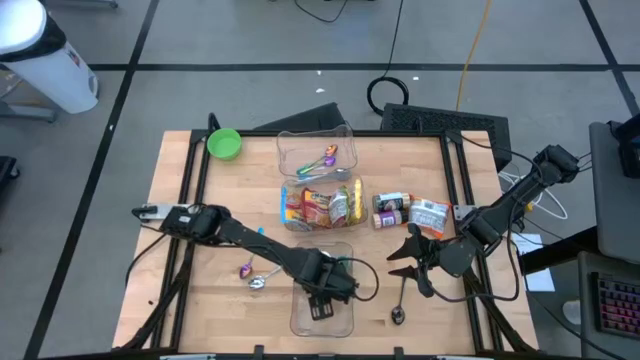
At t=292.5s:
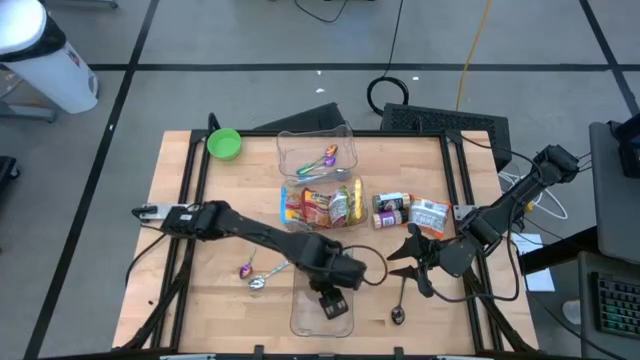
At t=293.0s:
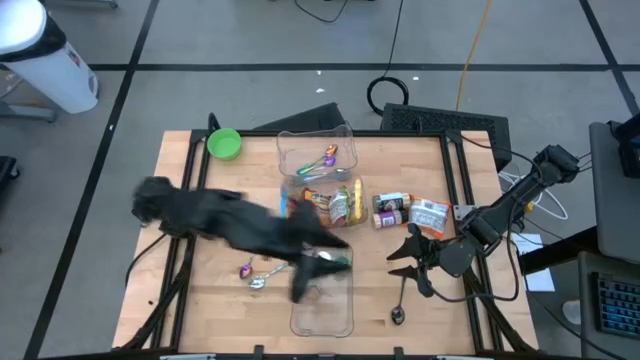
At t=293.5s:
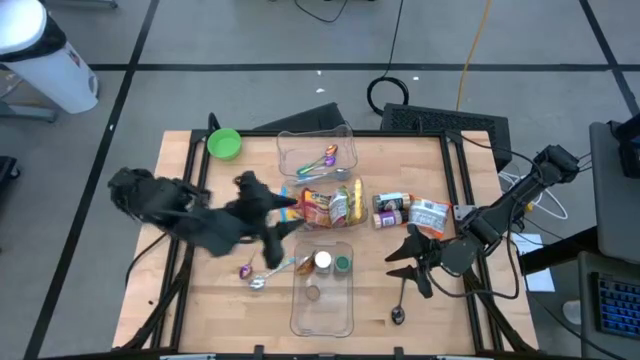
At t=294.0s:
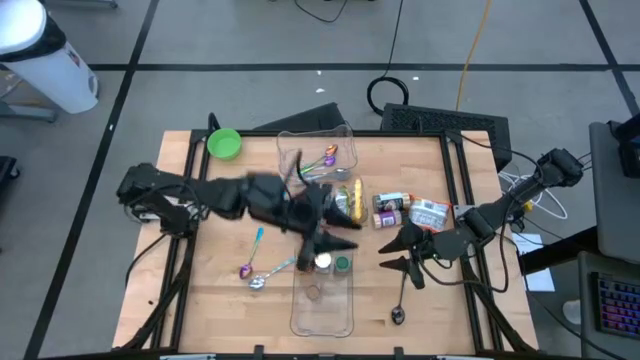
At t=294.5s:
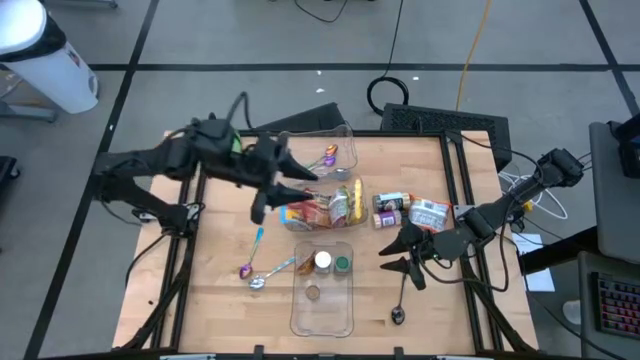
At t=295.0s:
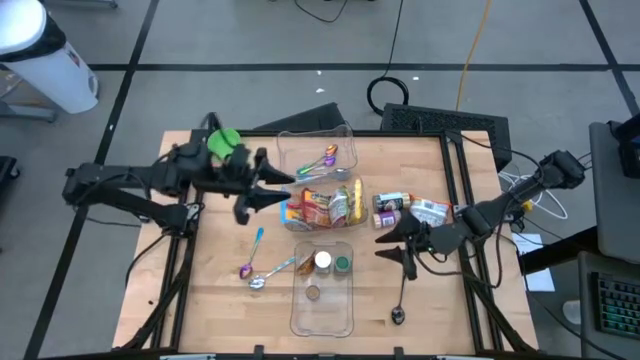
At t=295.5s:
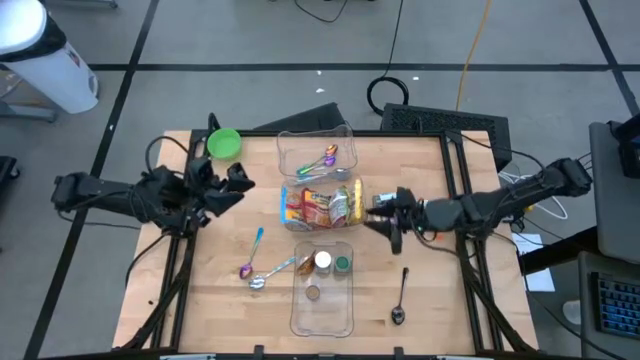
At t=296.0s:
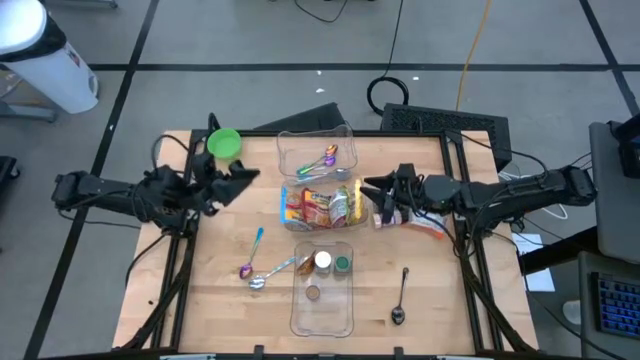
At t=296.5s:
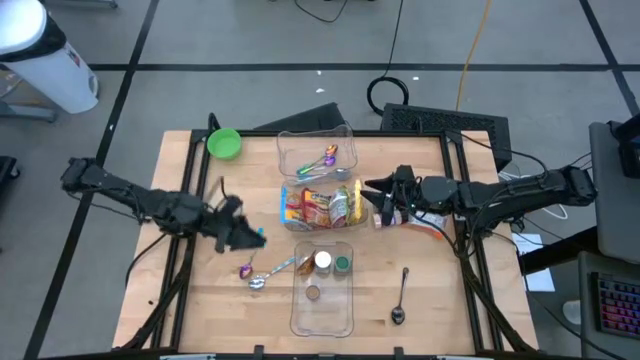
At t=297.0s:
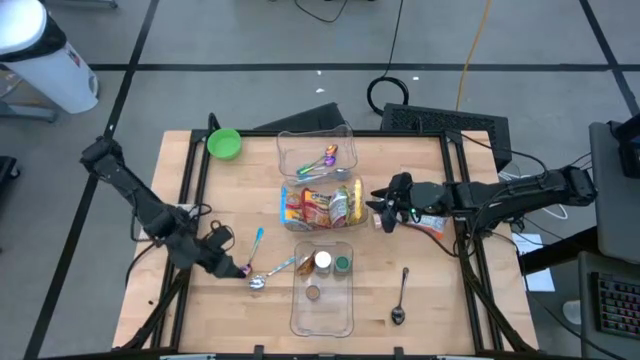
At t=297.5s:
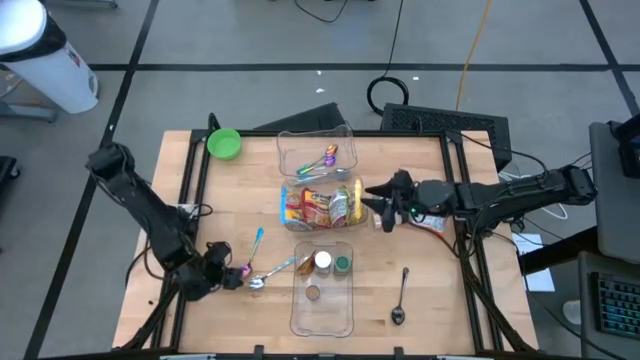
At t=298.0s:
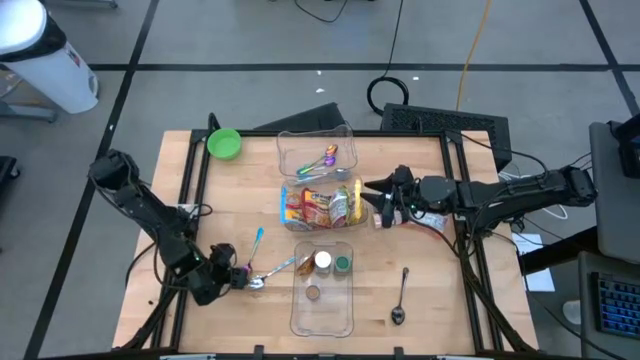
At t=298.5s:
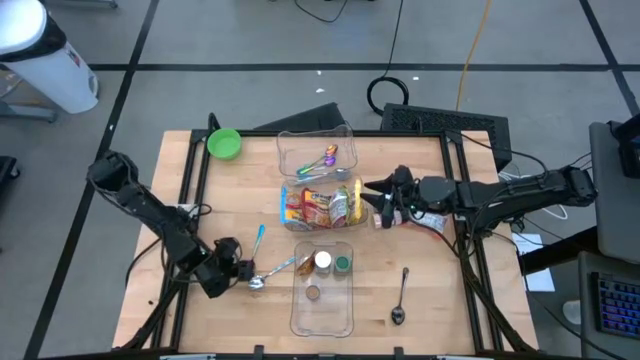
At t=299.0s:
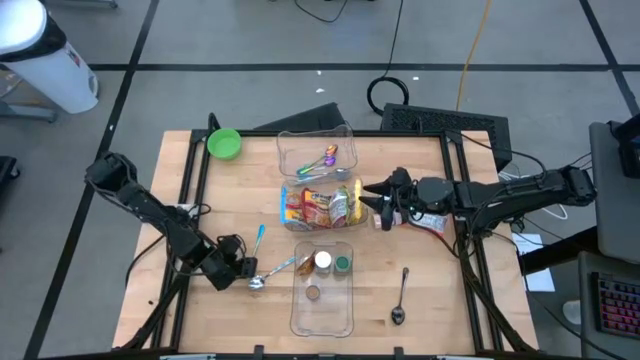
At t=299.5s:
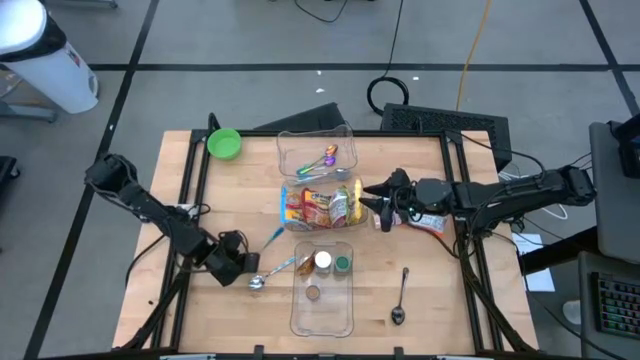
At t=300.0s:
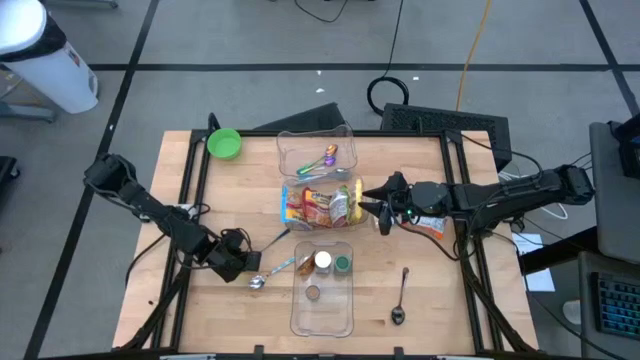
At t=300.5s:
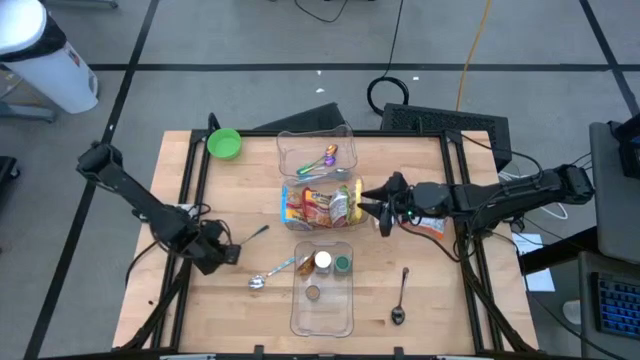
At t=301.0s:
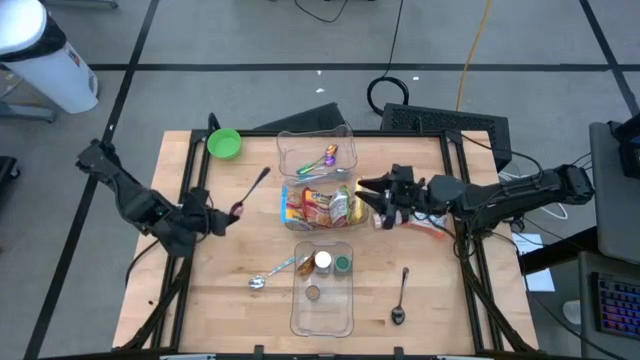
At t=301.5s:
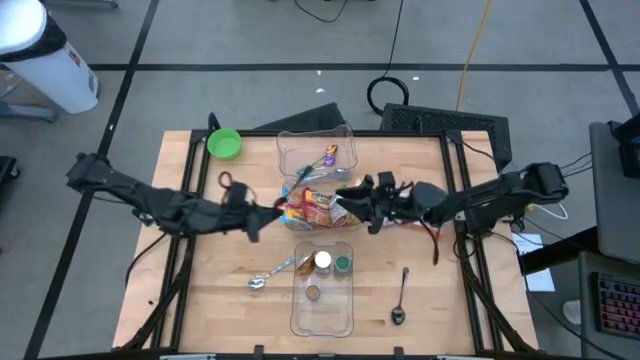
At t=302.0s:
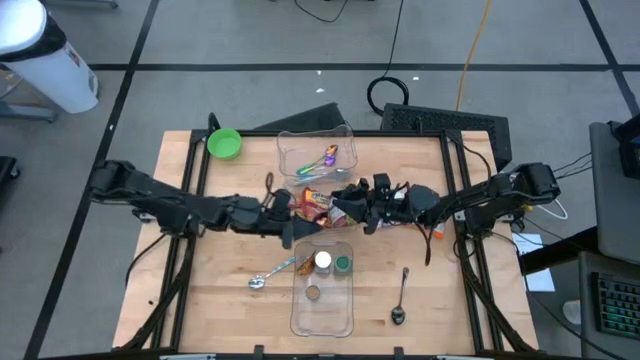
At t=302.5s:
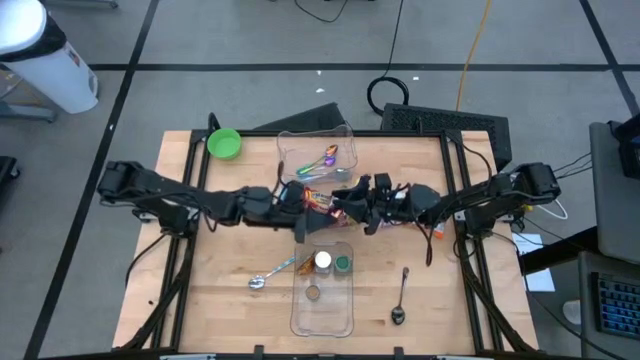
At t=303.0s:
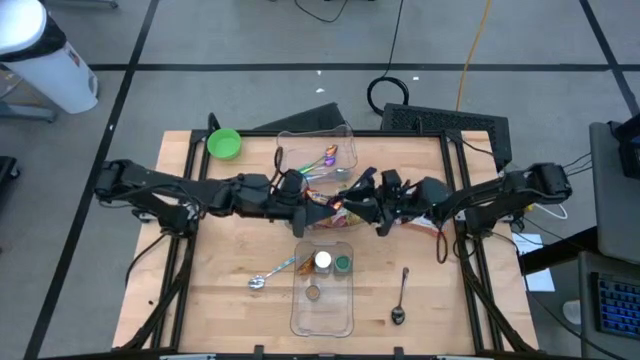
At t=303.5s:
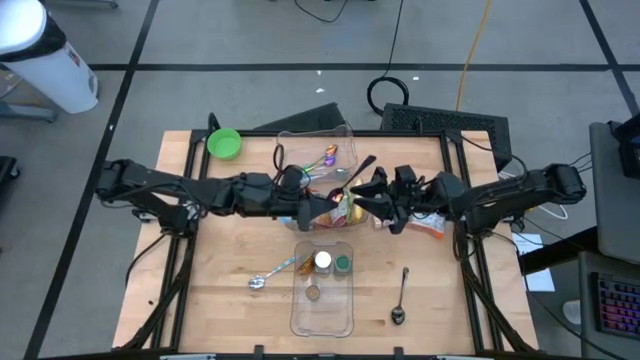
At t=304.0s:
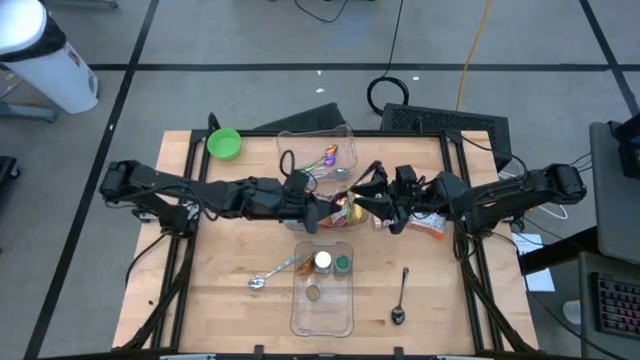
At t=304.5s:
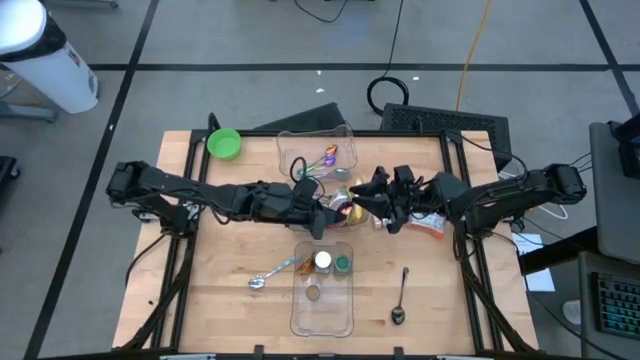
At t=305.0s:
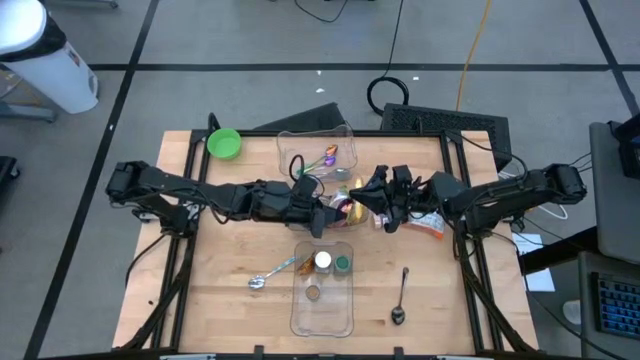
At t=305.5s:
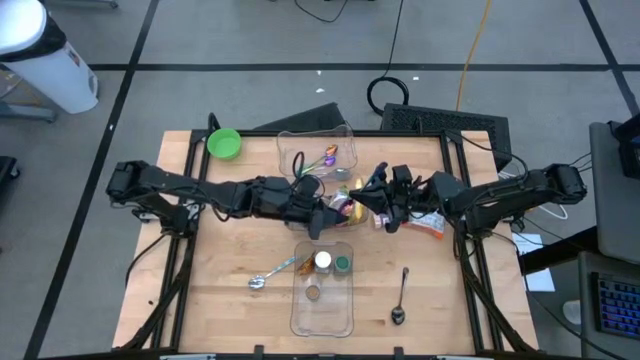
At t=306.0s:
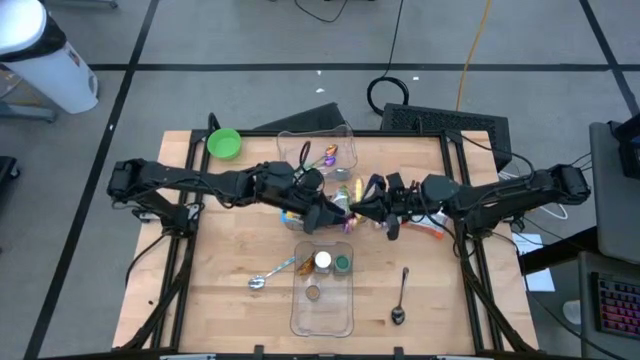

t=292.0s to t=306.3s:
Task: Pick & Place Food Item
Put the purple spoon into the top transparent bin

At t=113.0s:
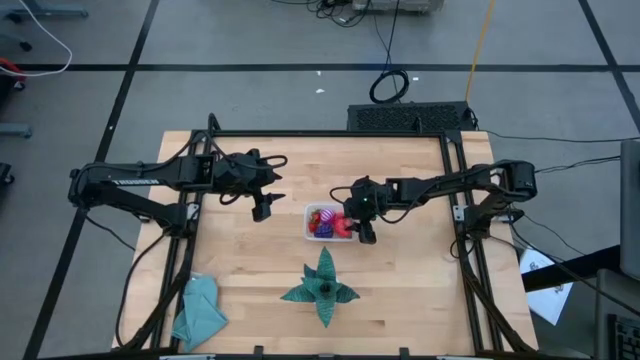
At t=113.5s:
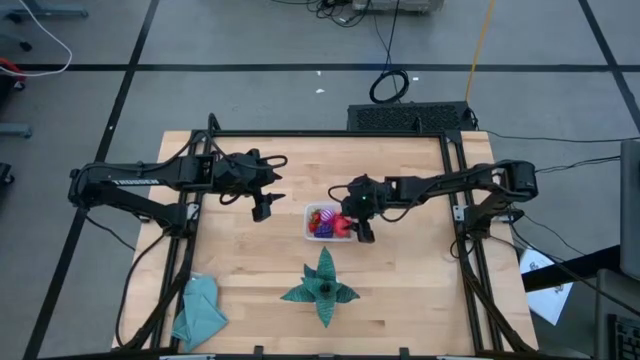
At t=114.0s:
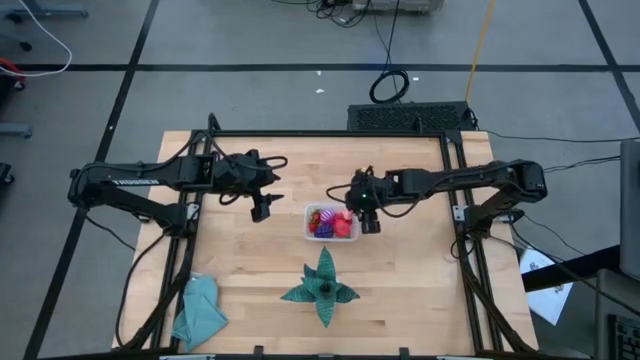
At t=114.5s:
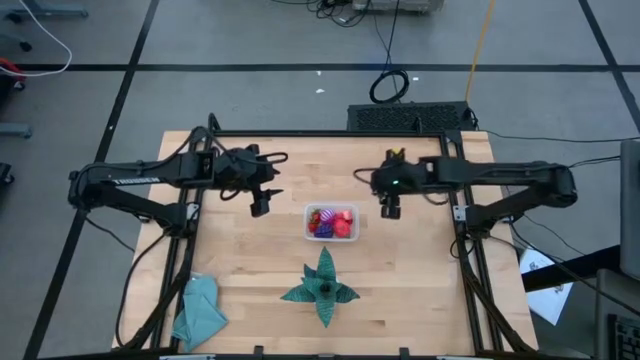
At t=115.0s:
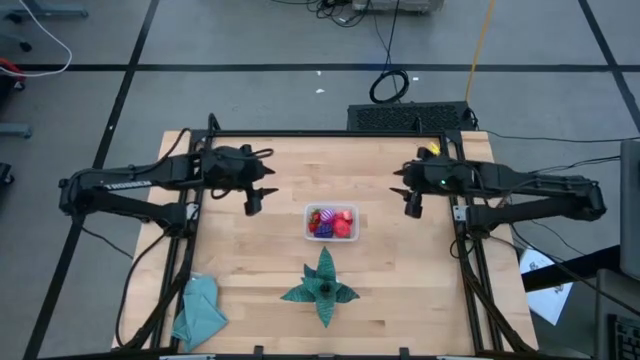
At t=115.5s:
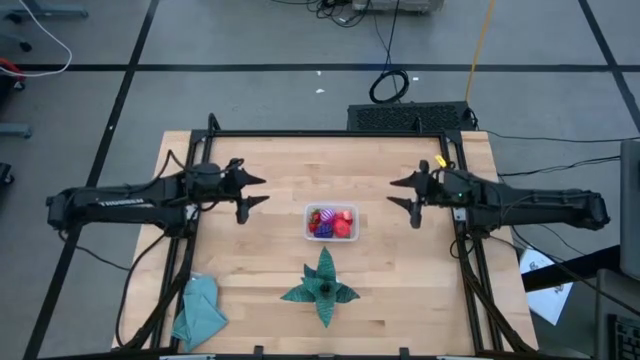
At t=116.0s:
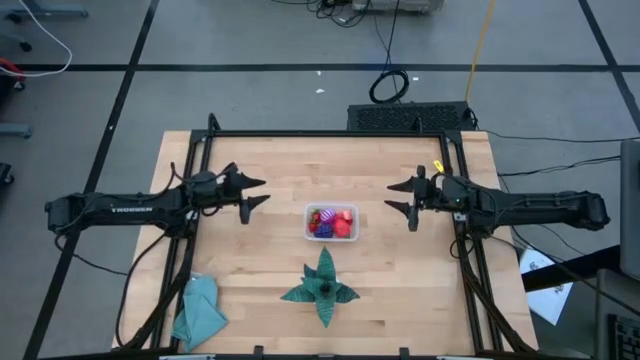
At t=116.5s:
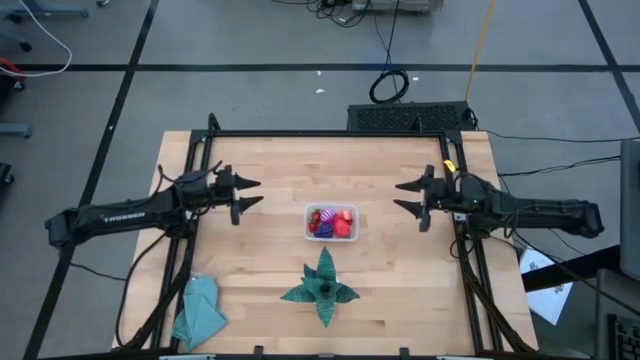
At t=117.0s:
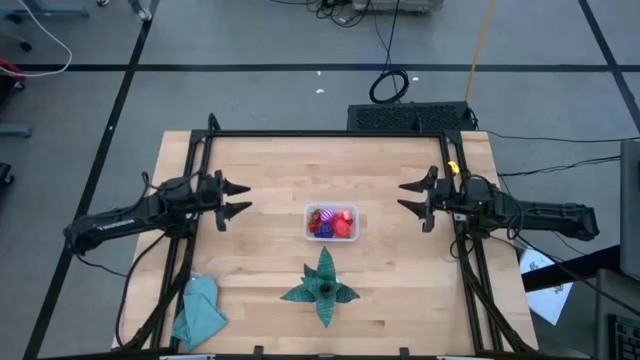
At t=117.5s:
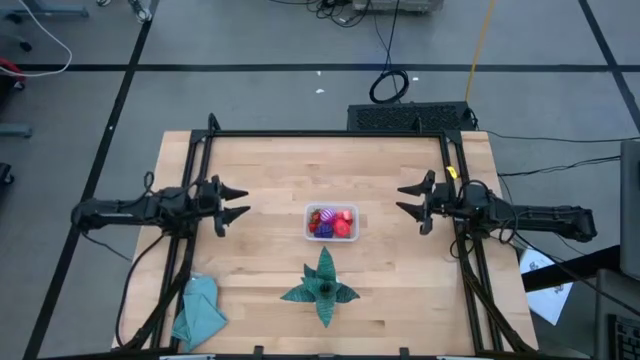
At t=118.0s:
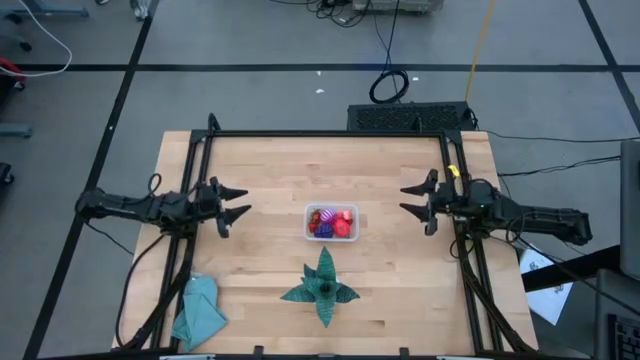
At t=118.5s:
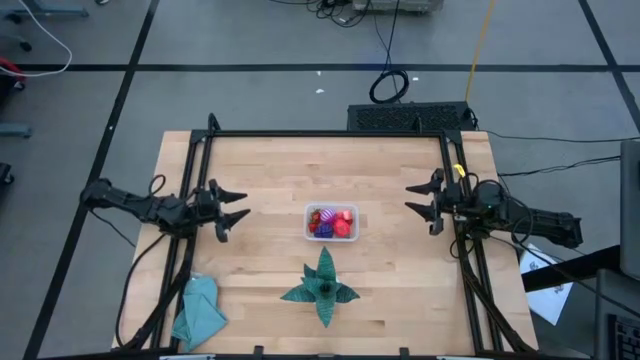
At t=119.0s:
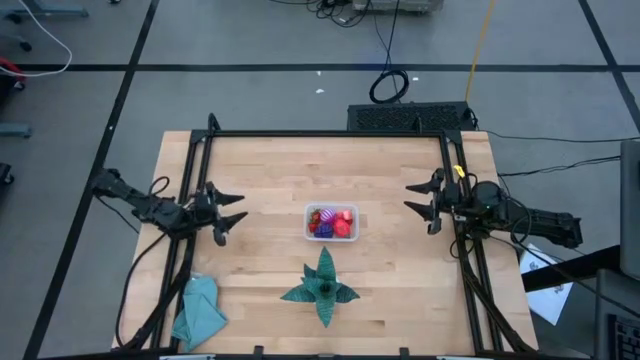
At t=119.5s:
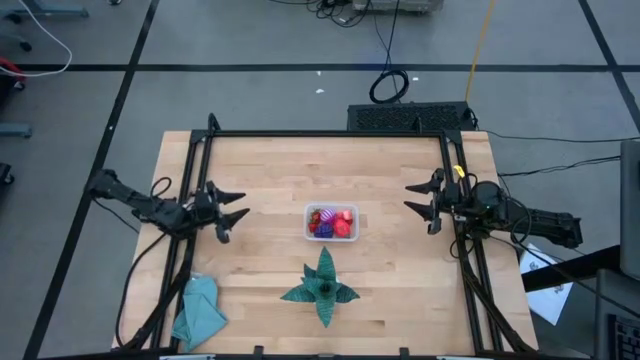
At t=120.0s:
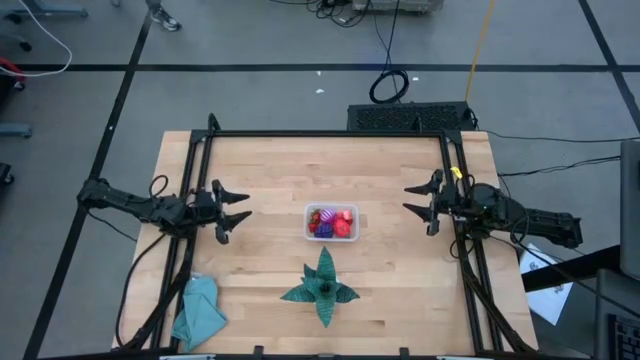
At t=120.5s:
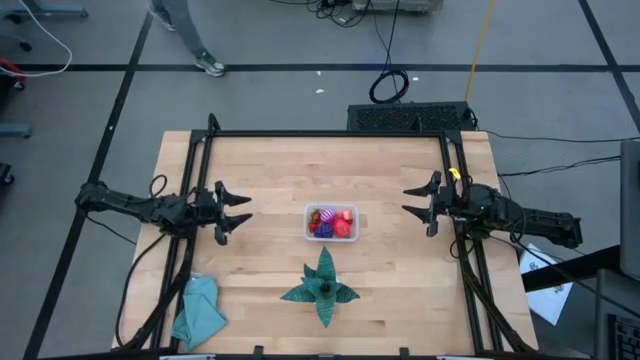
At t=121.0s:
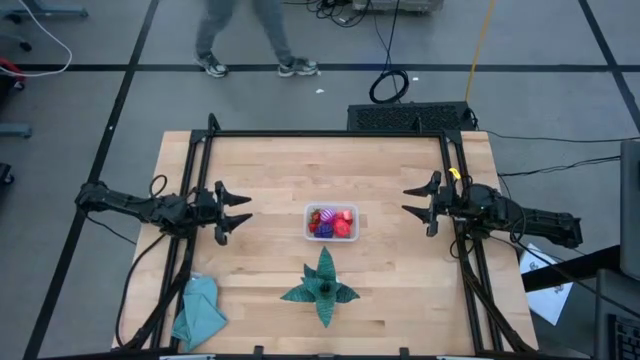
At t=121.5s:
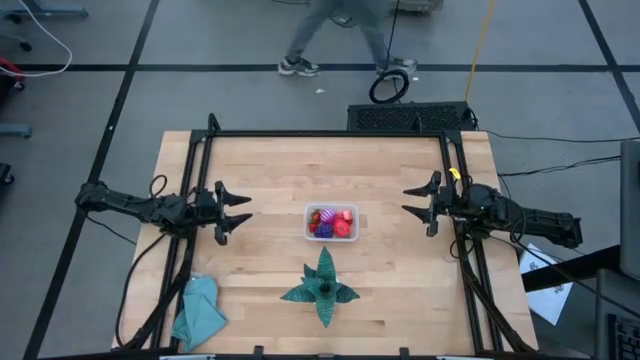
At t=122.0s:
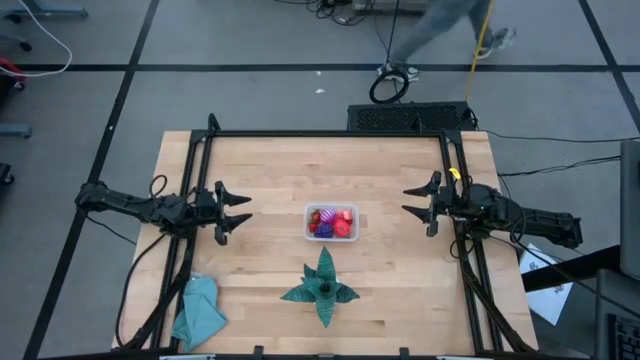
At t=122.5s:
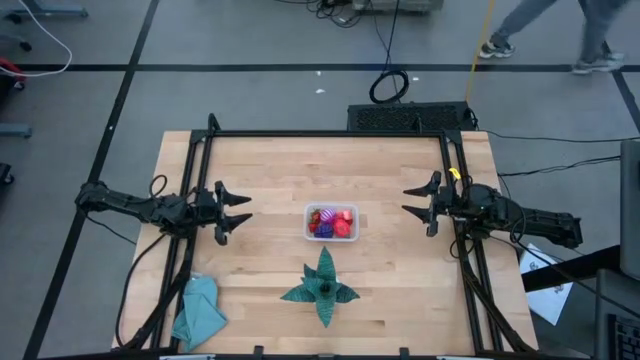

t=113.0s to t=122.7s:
Task: Pick and placing Produce into tupperware
Return to Home Position
